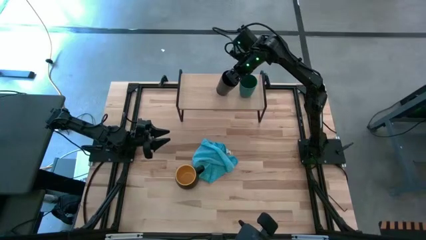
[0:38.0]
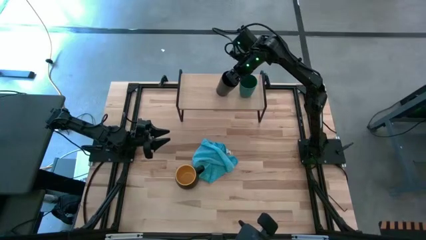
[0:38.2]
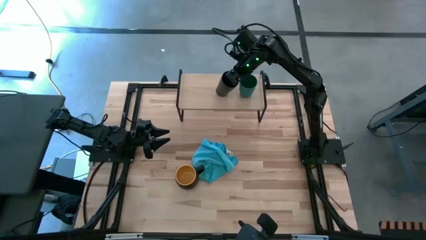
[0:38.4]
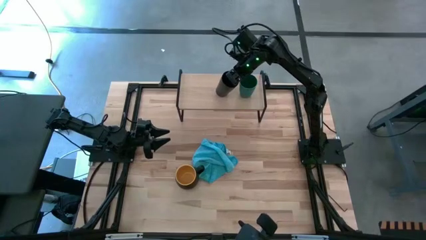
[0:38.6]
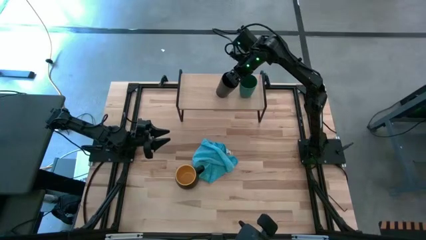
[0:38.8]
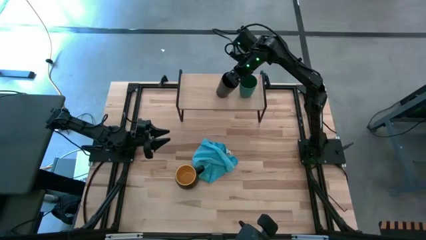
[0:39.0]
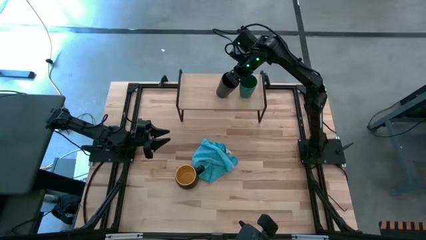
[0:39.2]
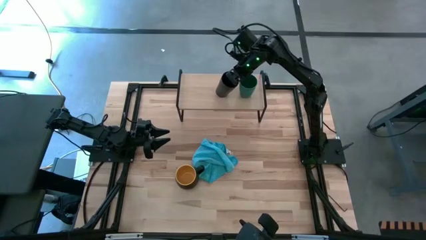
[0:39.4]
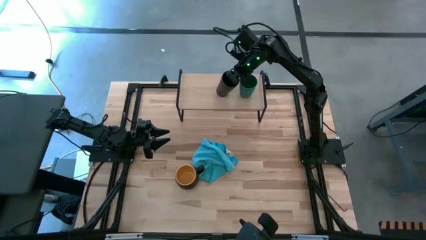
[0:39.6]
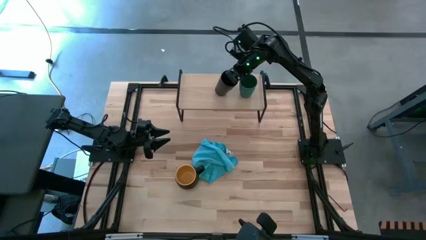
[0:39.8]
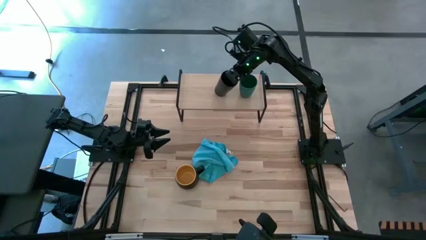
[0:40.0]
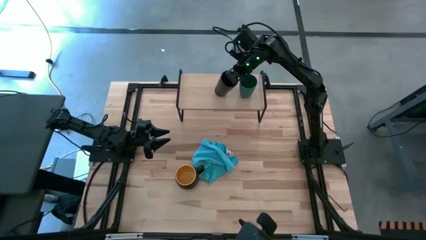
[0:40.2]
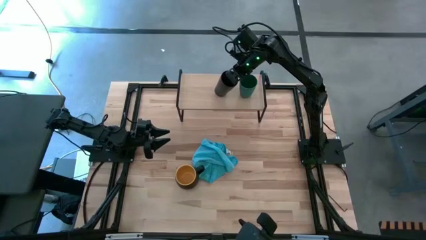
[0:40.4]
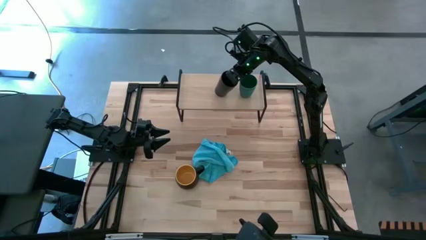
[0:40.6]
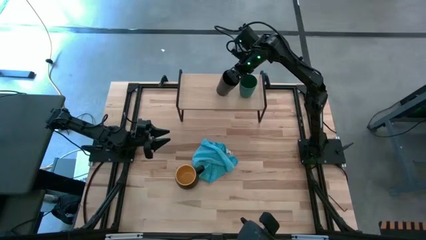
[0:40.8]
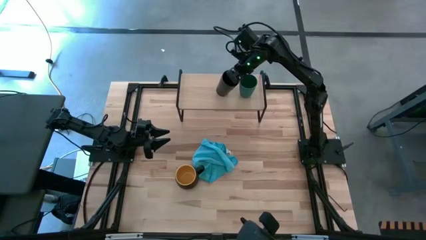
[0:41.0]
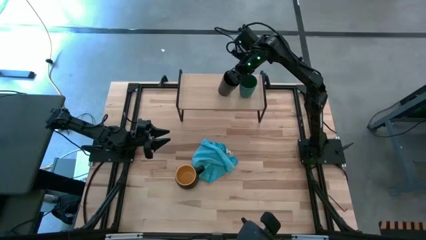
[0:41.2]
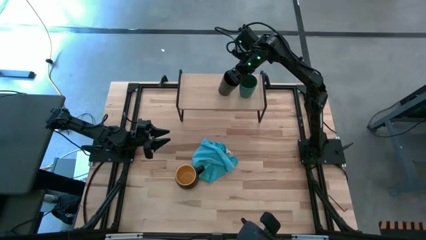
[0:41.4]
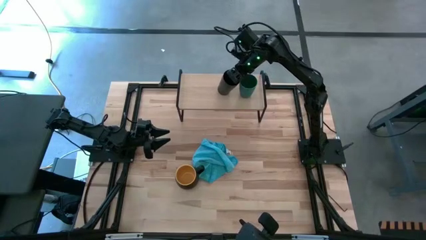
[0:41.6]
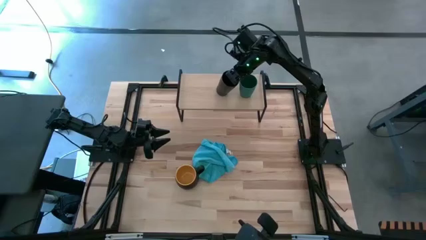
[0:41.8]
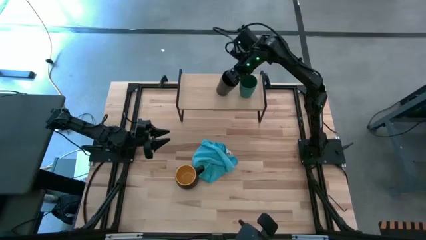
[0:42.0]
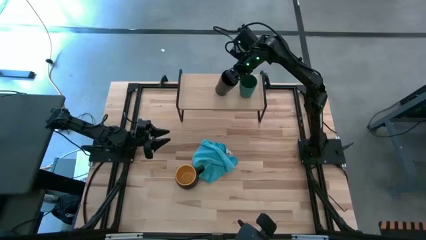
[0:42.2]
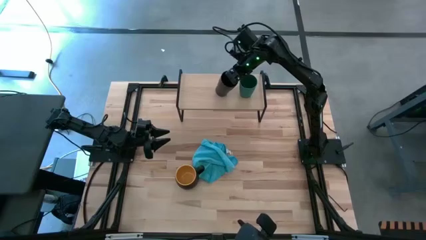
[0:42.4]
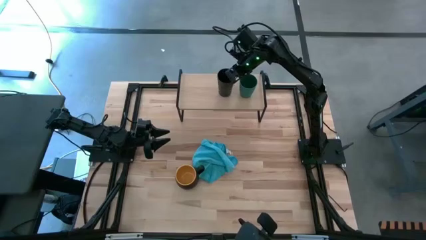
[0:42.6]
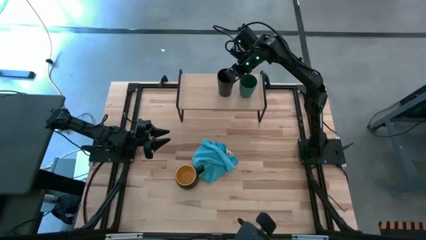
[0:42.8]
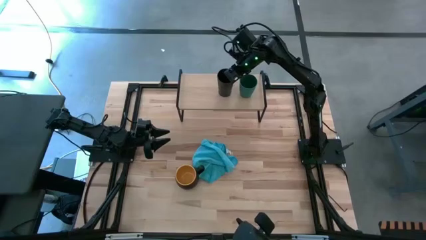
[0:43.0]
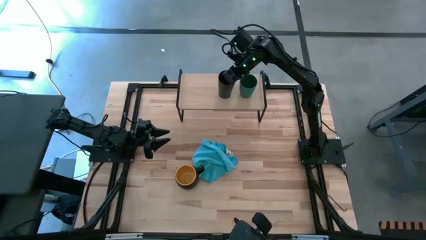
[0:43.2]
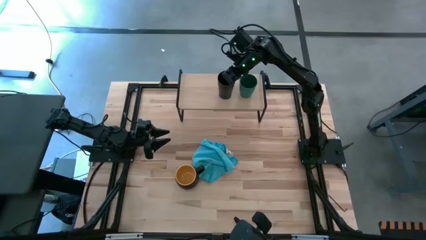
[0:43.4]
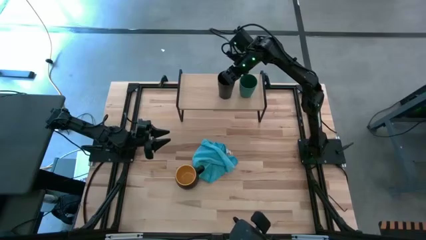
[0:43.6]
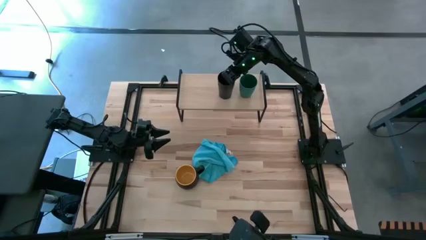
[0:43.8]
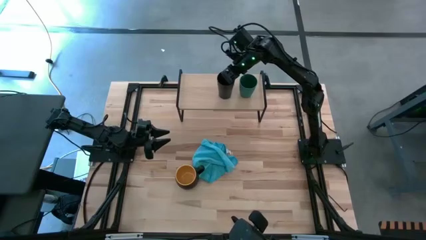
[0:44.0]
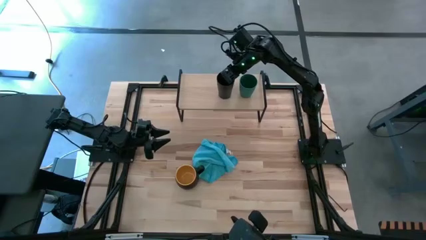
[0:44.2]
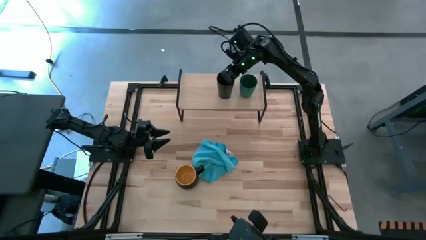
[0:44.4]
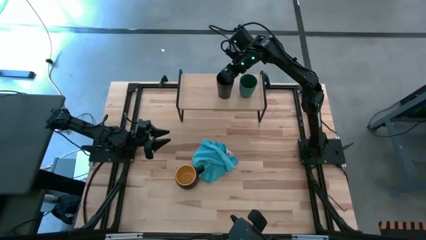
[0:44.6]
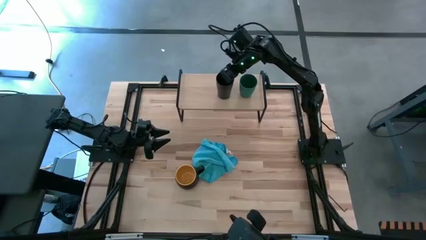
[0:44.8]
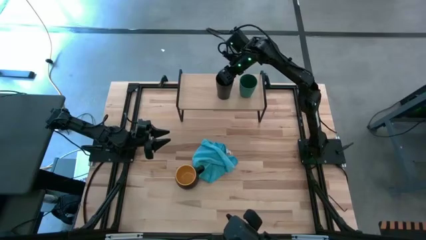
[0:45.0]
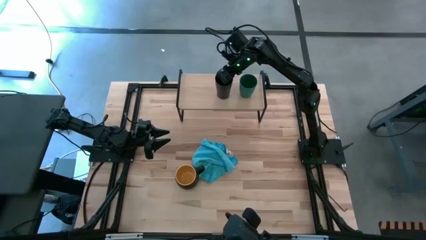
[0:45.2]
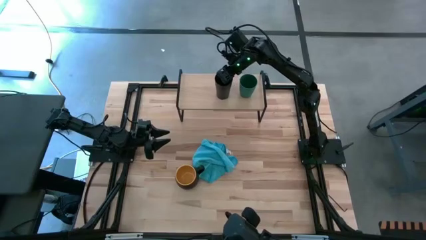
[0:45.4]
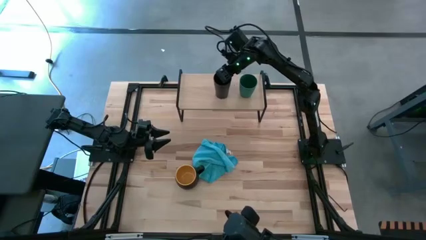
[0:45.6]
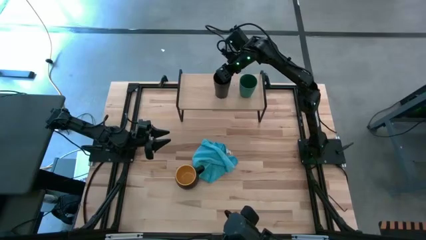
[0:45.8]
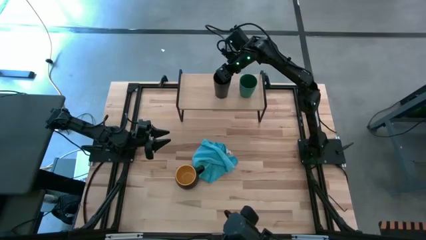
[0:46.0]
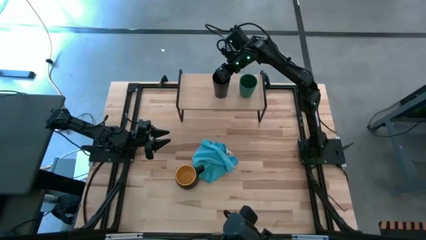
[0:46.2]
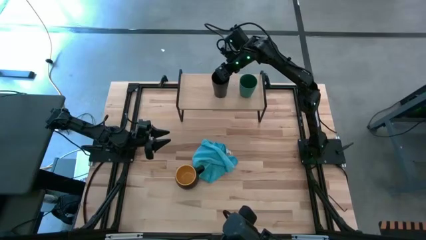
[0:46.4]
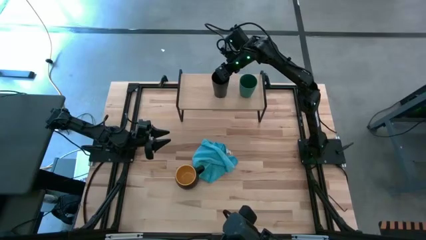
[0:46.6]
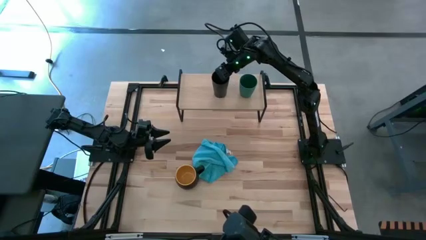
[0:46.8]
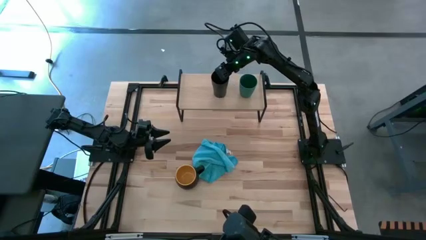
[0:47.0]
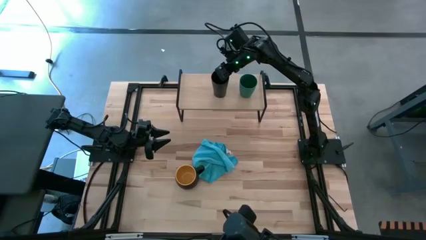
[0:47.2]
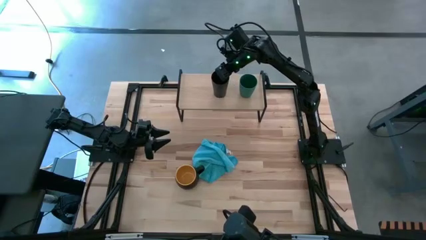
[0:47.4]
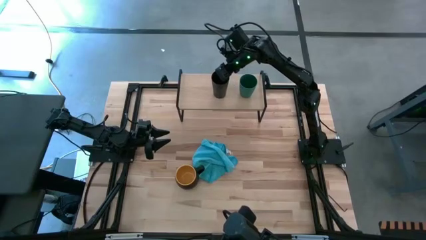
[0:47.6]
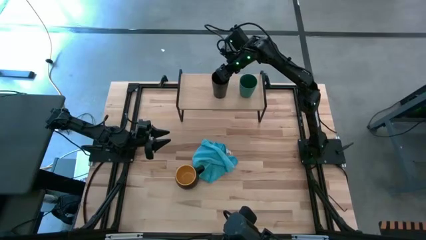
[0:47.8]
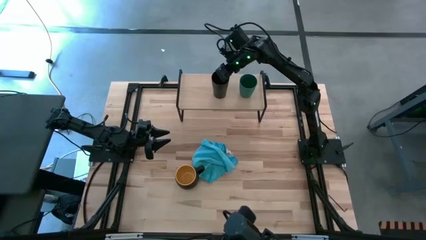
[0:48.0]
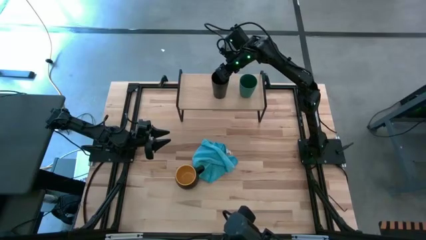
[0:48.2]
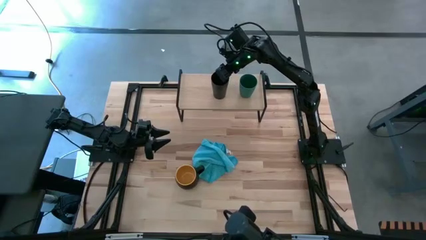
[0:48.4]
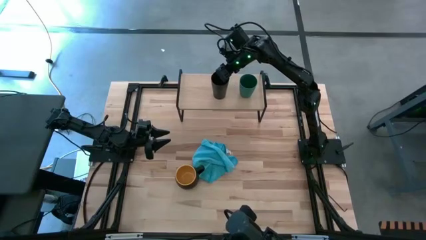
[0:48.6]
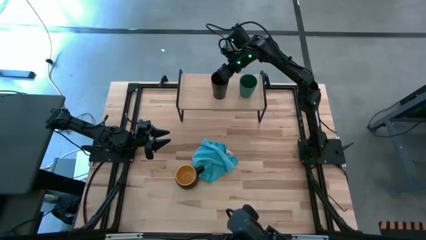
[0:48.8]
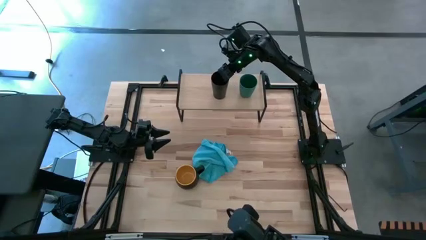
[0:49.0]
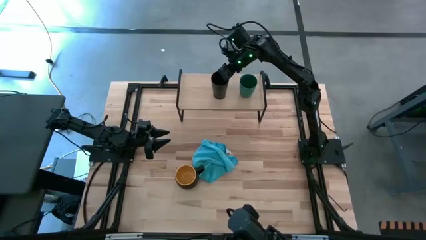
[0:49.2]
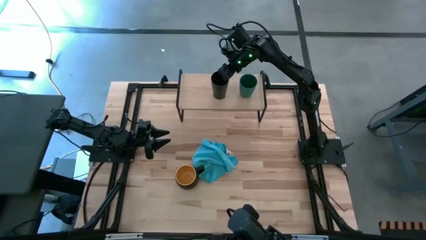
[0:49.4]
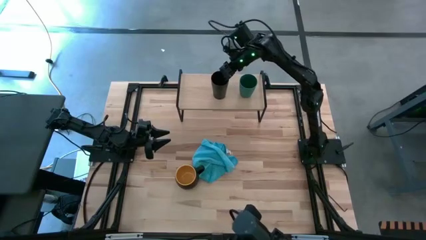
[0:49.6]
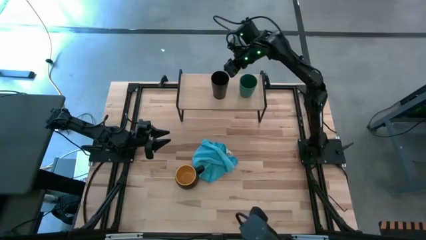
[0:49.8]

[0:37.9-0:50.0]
Task: Stack small to large cups/mugs on shelf
Put the black cup on the shelf

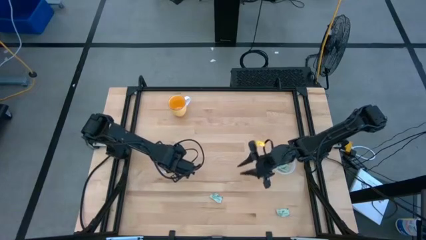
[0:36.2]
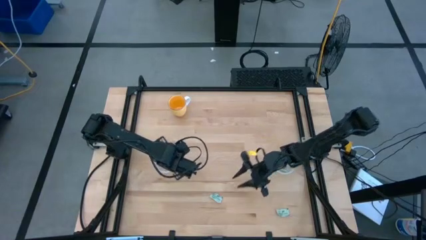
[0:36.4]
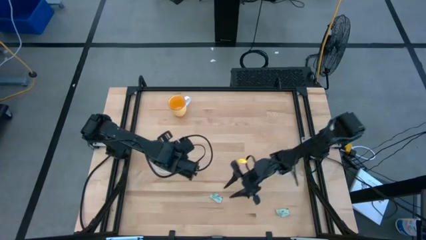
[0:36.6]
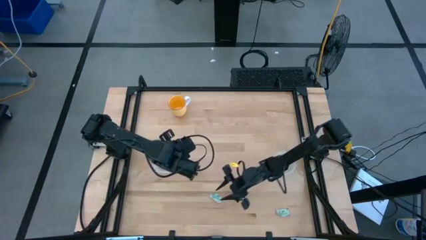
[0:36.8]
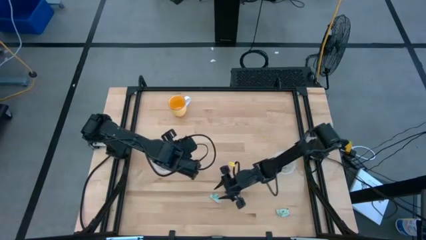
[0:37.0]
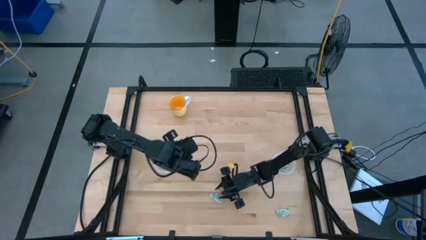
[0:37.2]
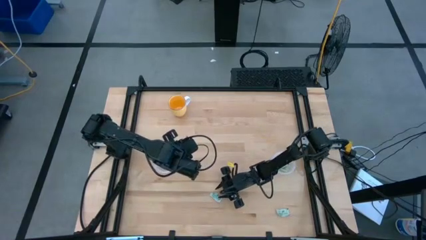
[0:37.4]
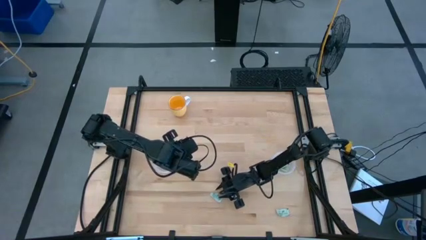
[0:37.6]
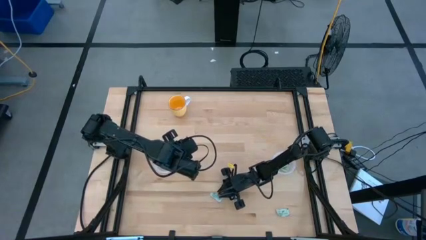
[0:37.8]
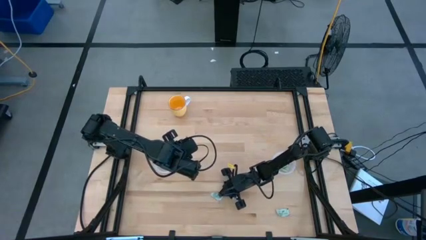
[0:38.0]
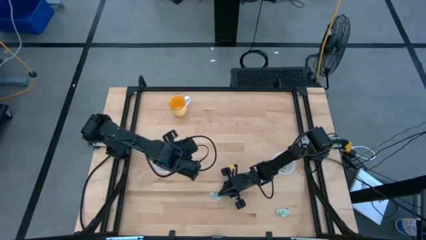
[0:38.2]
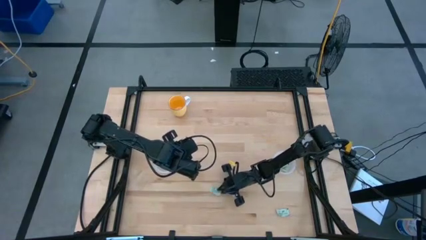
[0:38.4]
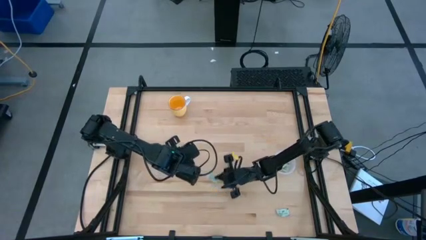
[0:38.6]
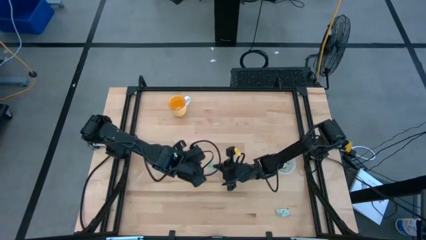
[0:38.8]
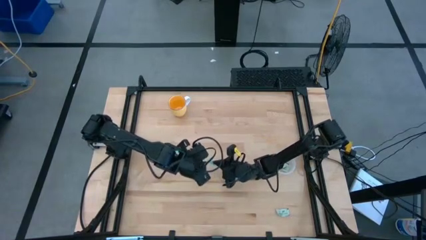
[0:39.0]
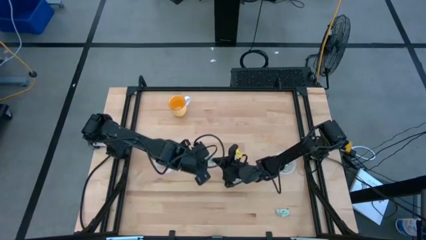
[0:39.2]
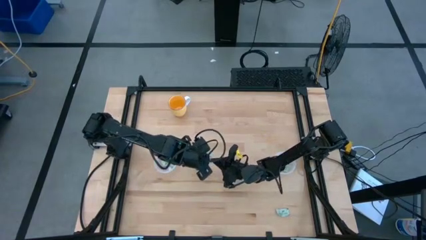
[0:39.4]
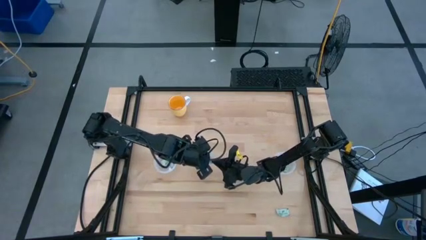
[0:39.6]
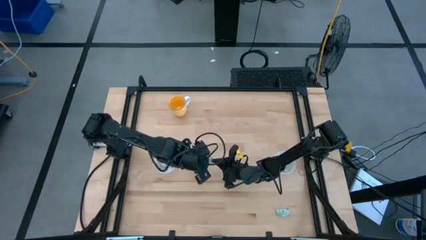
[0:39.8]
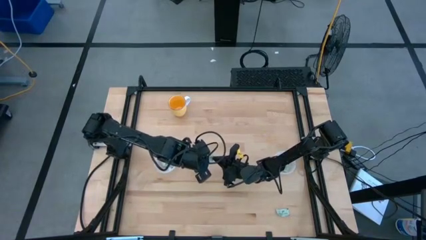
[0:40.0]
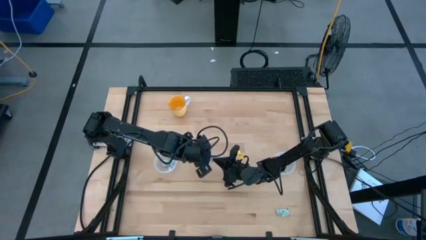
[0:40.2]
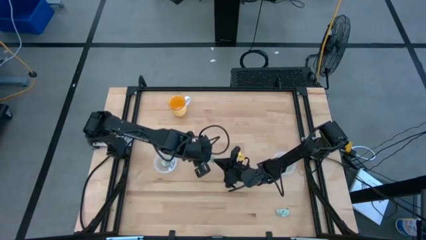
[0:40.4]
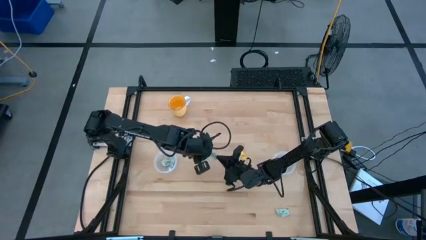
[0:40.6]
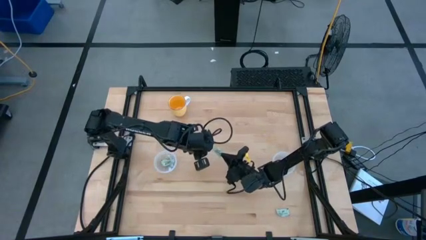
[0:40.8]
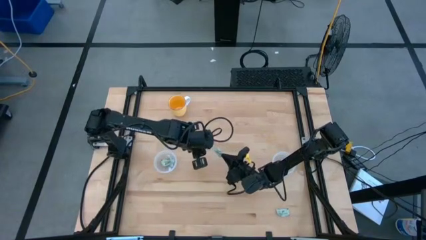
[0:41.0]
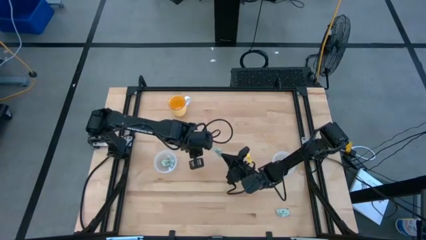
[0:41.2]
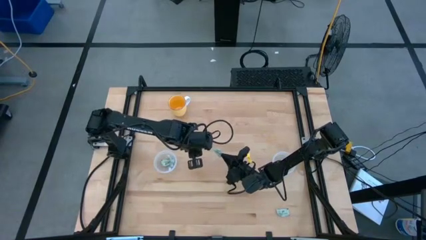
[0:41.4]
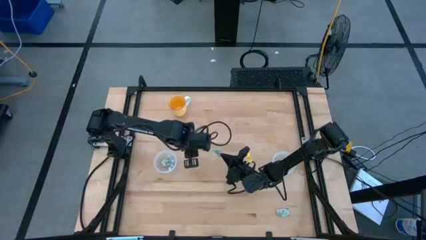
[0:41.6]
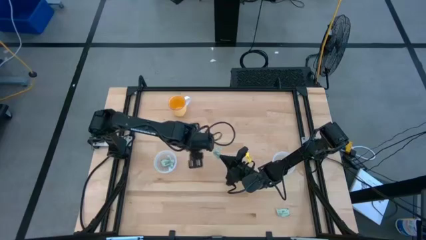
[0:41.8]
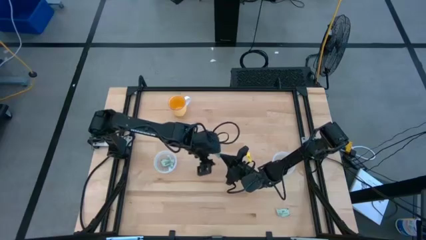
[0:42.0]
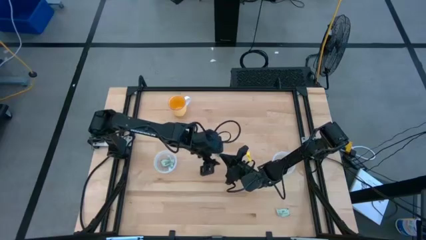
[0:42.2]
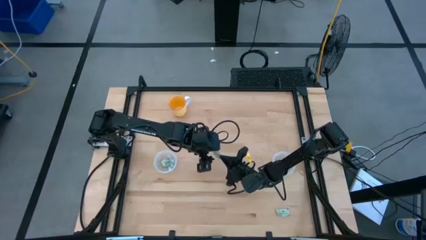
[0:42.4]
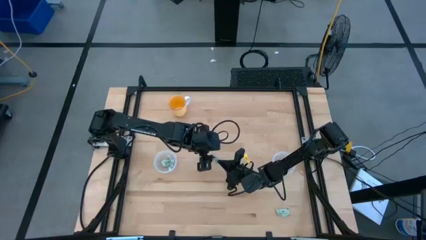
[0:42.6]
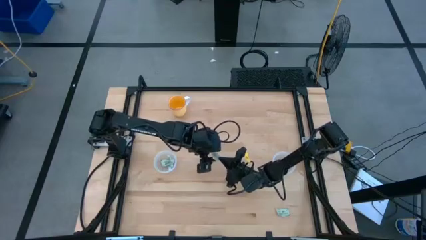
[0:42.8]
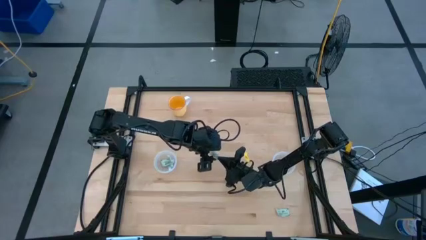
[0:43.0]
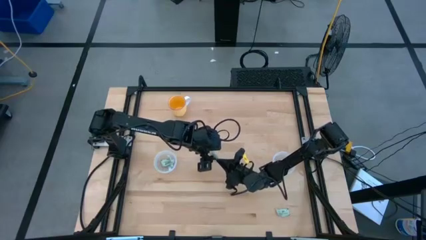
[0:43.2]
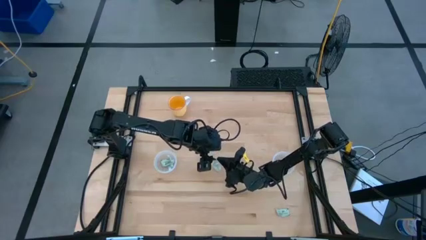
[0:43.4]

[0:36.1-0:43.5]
Task: Pick and place items into bin
Put the stevia packet into the left transparent bin
